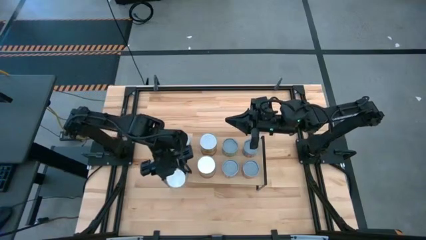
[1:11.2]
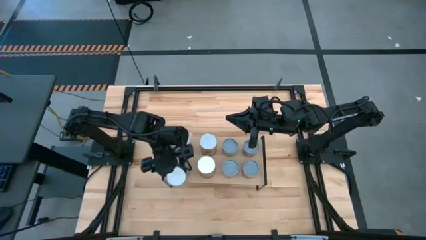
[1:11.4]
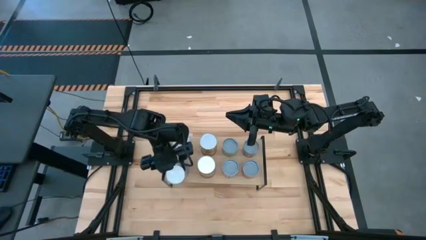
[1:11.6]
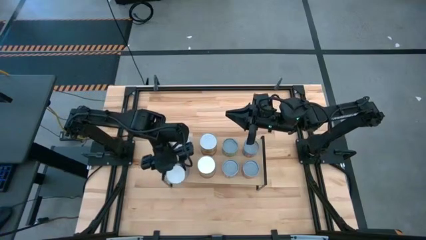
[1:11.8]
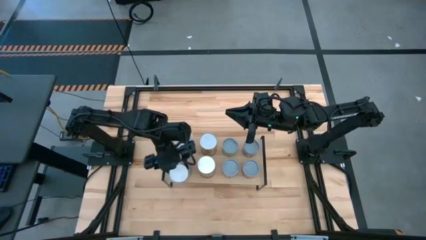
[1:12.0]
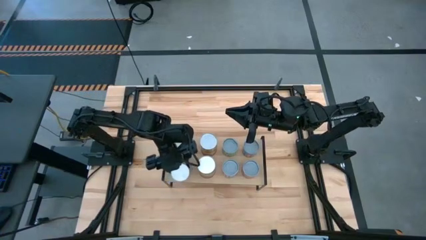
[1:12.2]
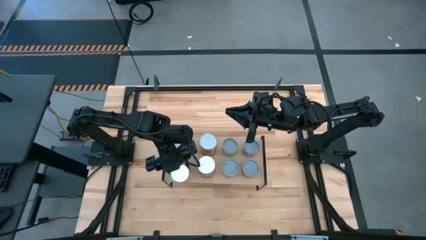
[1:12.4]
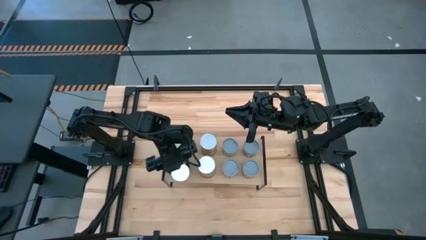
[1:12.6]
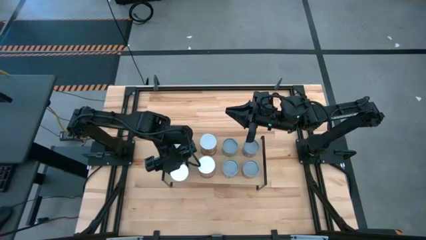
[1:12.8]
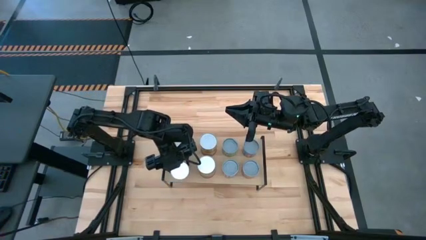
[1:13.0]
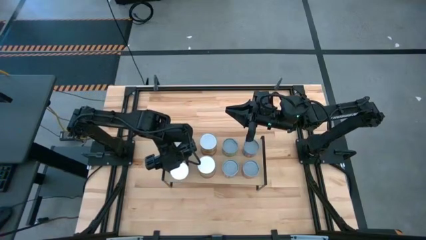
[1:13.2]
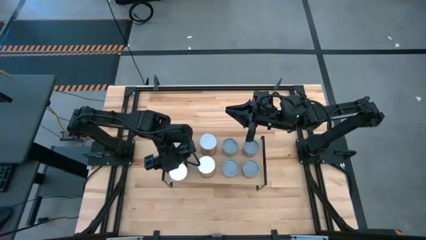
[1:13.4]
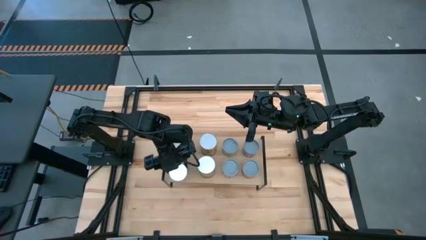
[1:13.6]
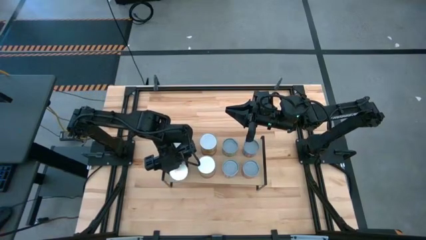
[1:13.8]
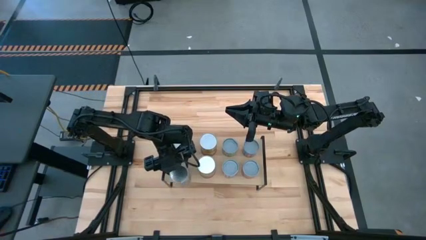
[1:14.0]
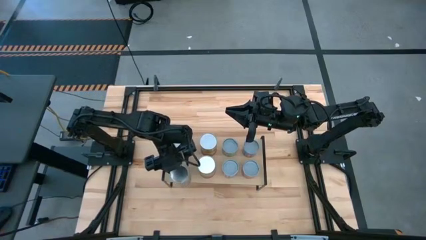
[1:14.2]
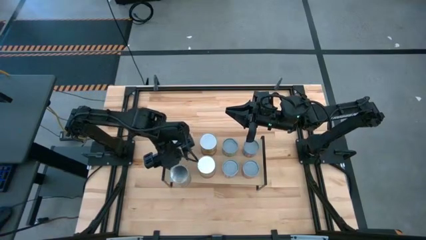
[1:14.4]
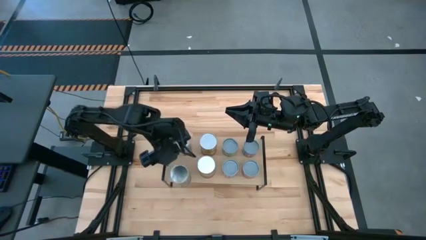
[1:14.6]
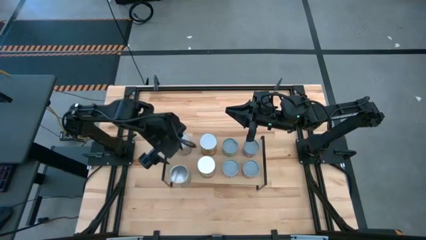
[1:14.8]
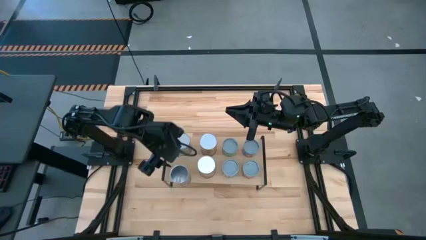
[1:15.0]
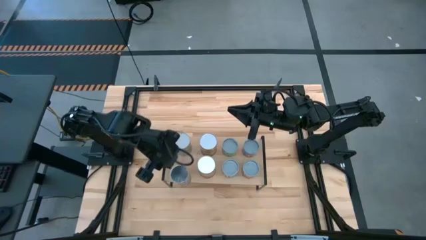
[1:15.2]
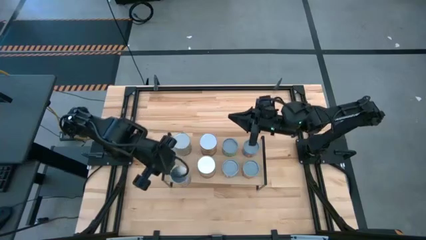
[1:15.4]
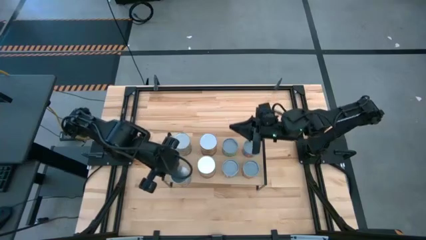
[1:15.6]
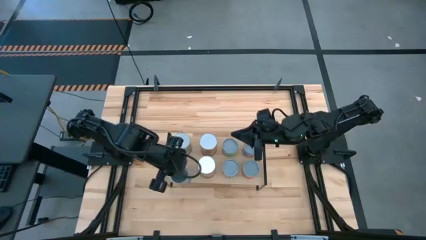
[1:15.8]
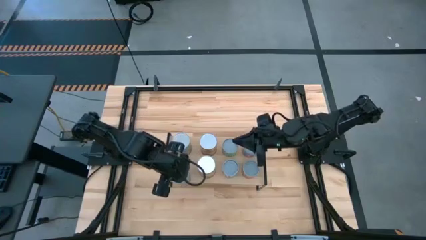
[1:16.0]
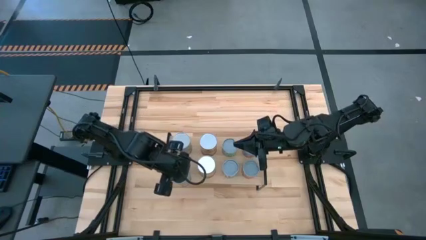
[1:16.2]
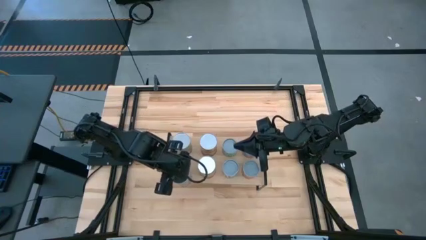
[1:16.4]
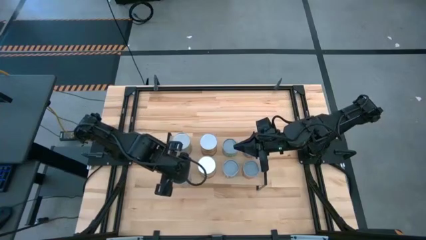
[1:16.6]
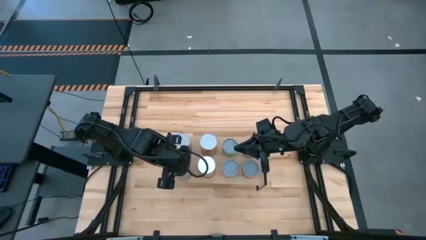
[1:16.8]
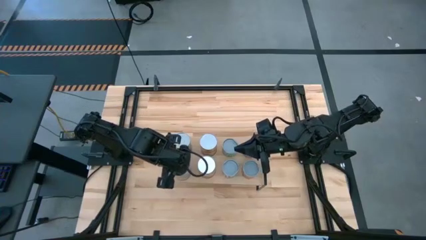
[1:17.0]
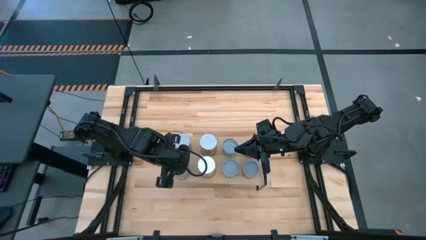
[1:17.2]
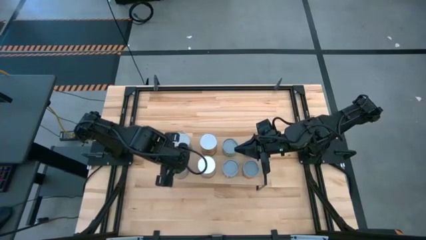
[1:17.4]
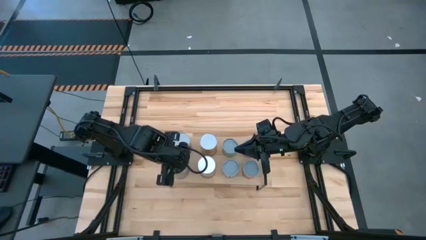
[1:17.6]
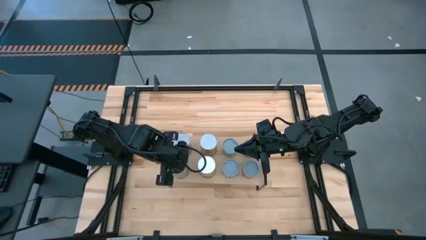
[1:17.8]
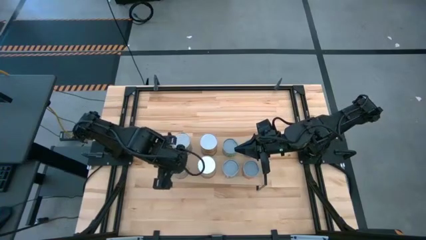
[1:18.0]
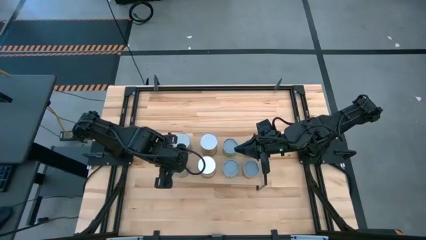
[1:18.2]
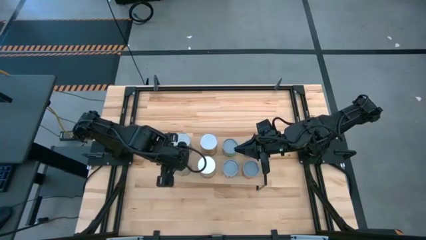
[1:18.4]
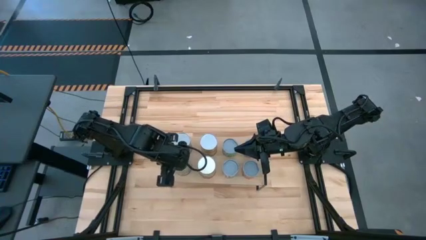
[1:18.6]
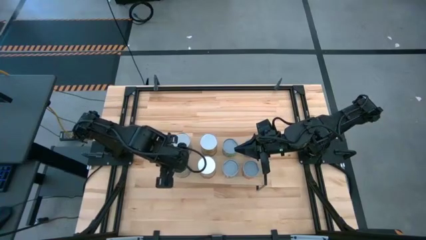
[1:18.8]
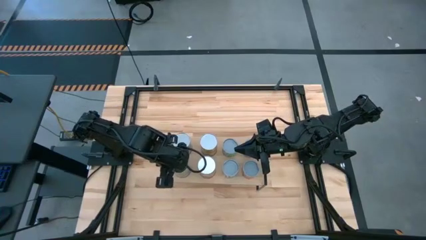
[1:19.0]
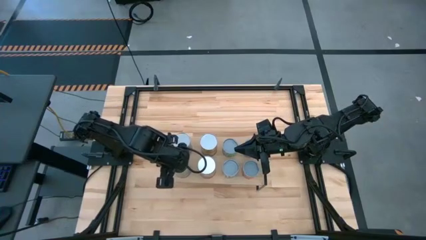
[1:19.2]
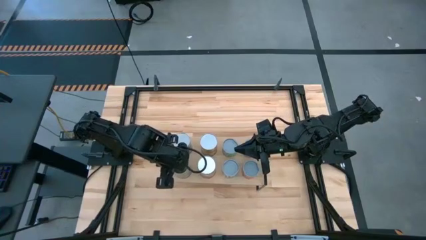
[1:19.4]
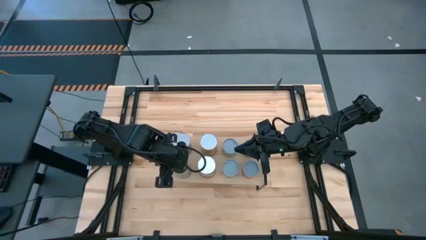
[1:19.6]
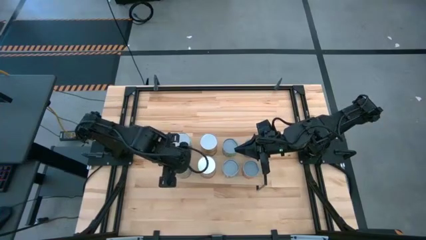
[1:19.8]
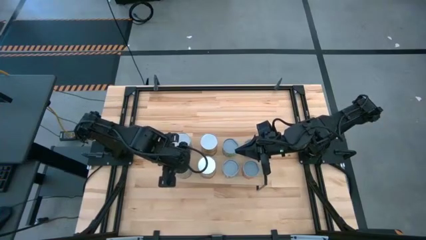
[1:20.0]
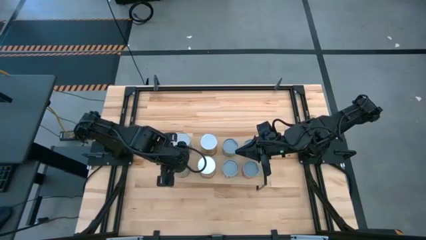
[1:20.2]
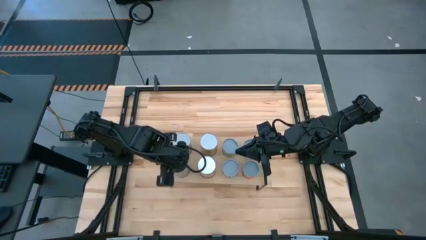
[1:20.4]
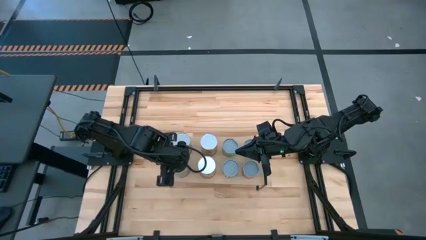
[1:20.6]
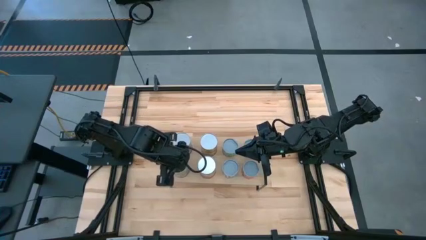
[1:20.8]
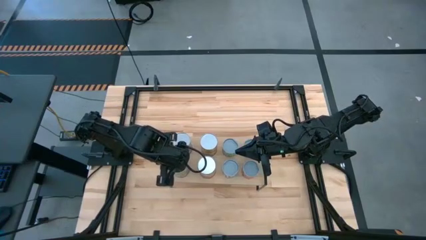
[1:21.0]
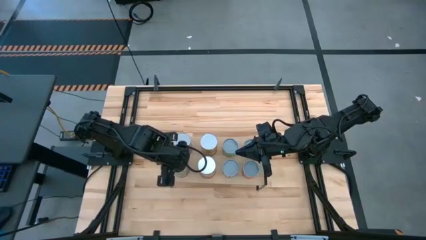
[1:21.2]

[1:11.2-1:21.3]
Task: Pick and place cans onto a shelf
Put the large canned peaches on the shelf

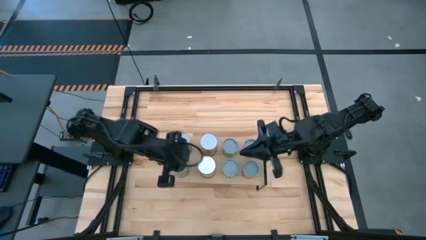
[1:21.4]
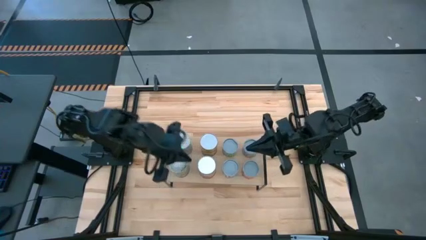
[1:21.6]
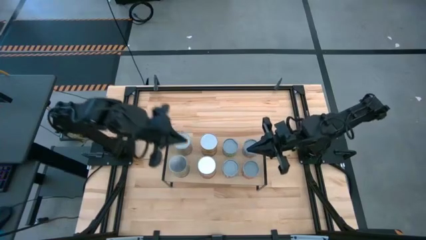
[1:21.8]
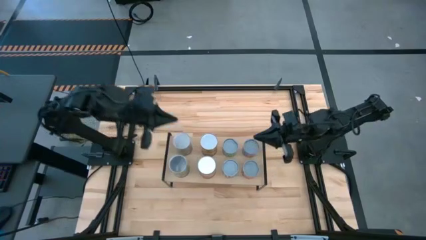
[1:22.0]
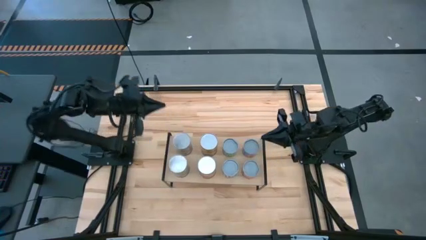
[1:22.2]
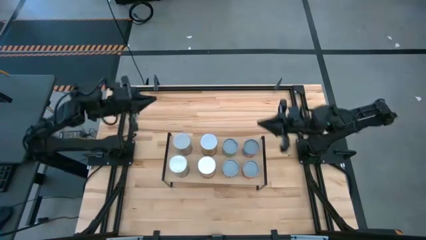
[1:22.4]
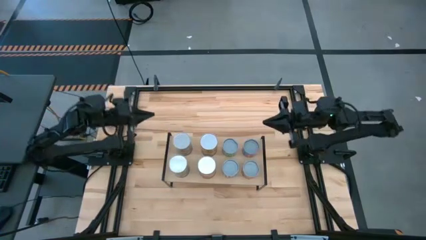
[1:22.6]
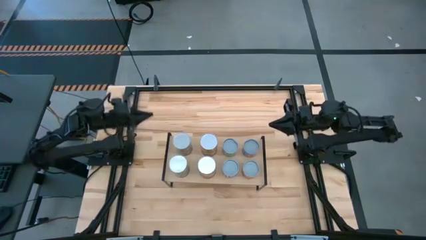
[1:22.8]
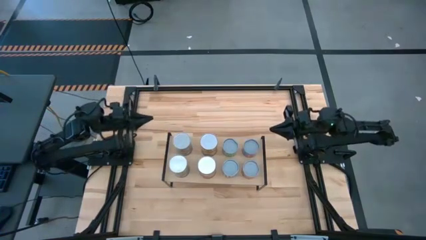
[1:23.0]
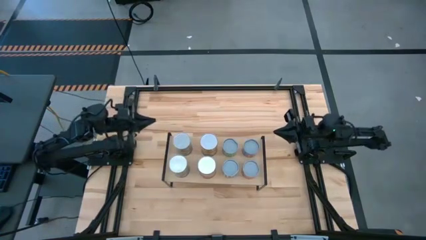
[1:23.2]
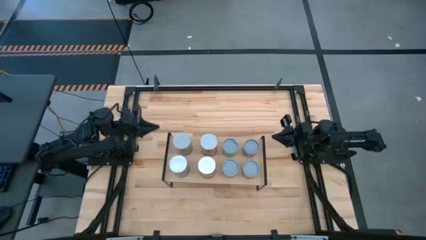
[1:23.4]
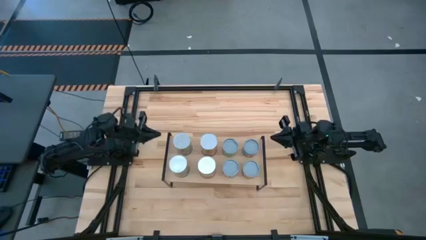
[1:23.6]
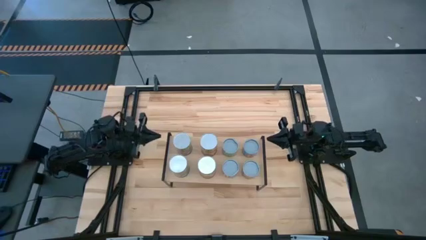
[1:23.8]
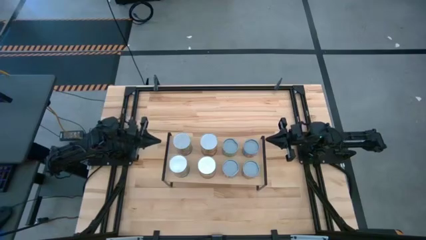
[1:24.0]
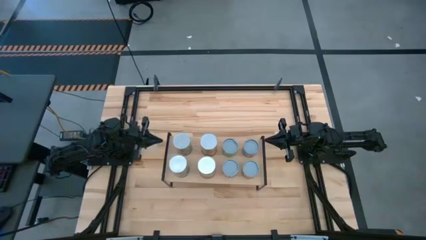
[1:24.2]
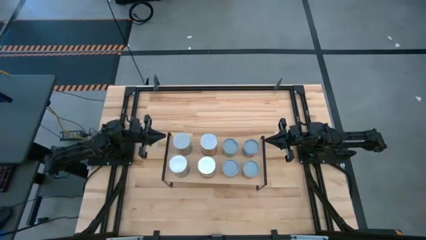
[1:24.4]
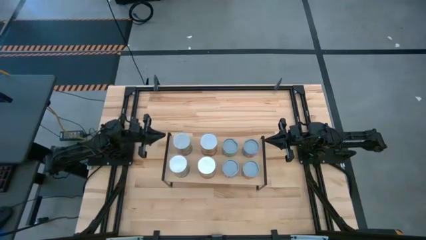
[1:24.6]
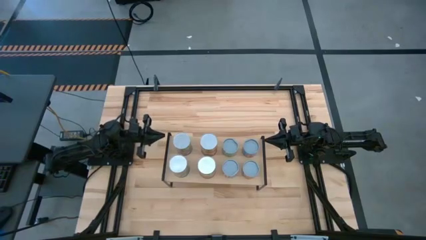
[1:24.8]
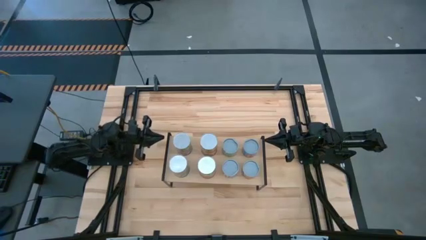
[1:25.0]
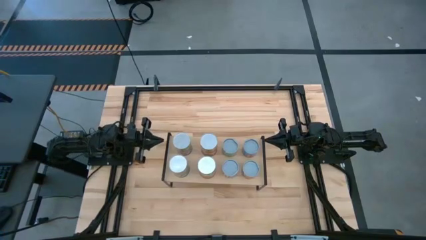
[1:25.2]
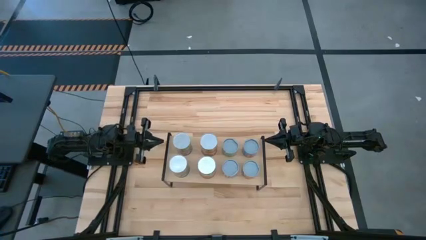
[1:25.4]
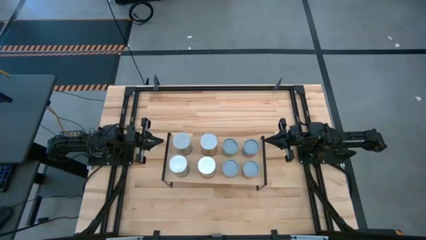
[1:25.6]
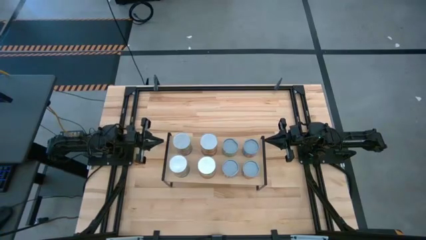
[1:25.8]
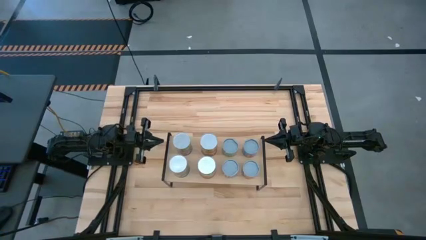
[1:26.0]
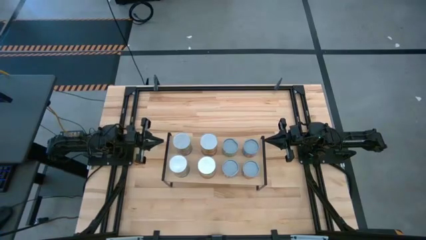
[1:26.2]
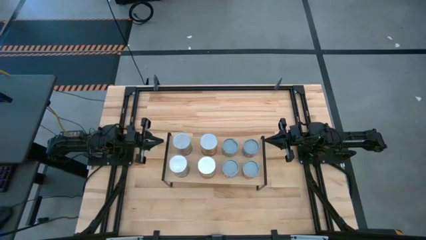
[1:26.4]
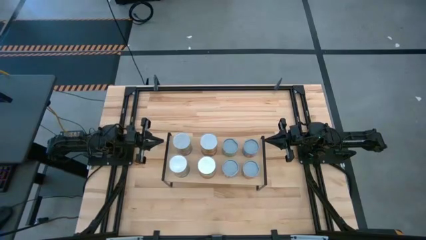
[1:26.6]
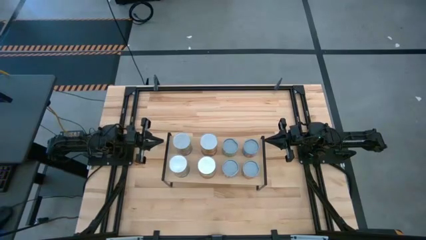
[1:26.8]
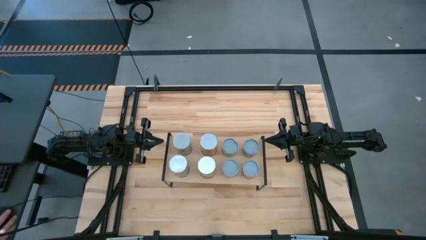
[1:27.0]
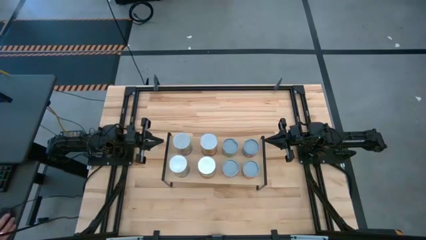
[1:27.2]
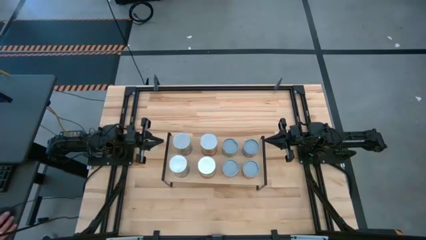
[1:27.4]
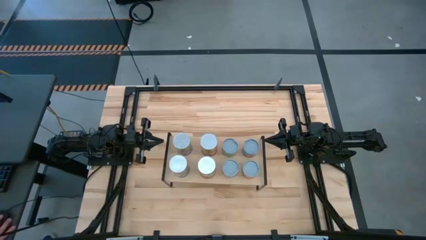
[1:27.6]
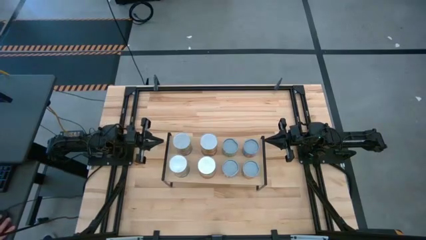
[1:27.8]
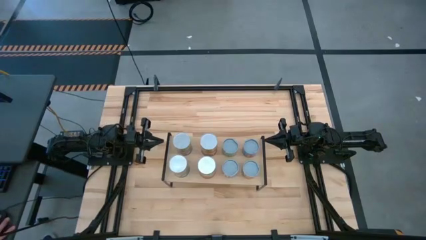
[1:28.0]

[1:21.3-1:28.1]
Return to Home Position
